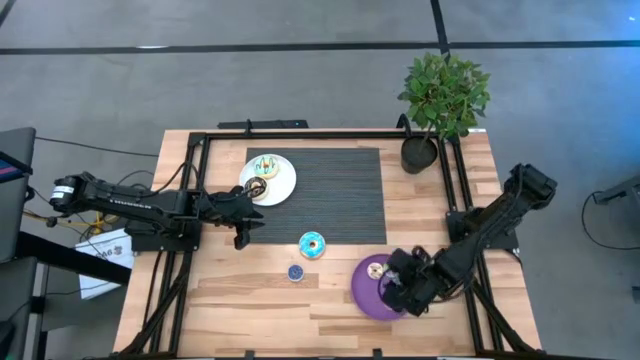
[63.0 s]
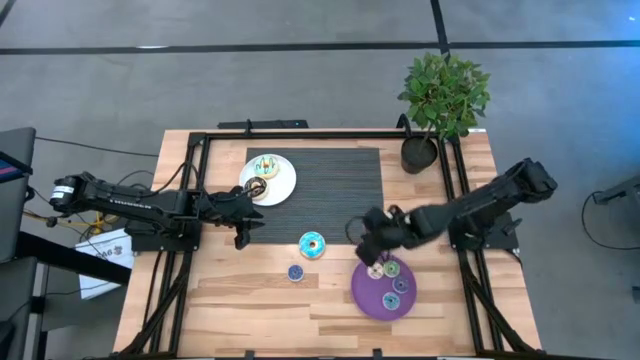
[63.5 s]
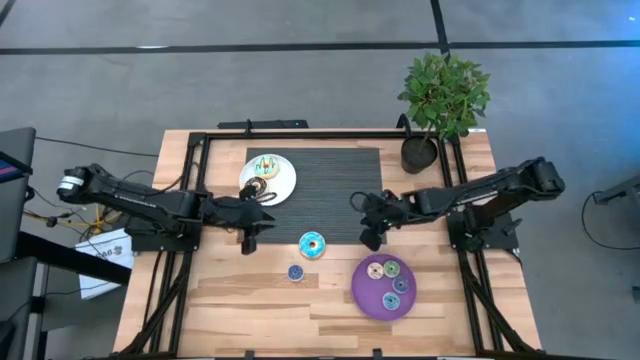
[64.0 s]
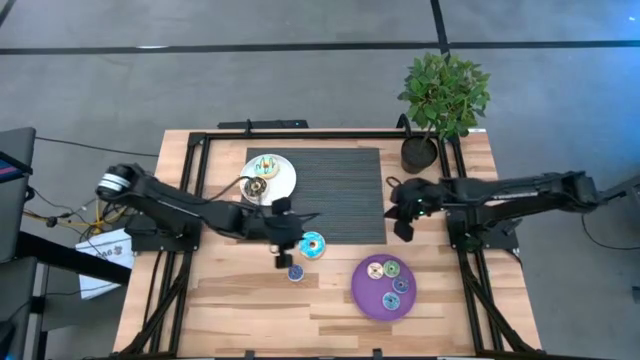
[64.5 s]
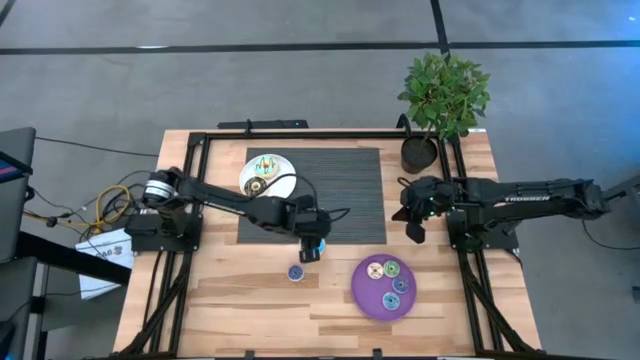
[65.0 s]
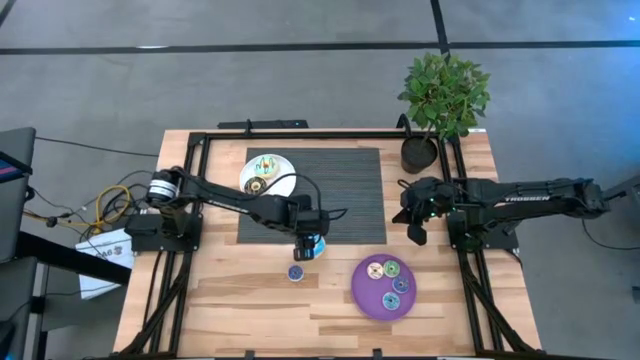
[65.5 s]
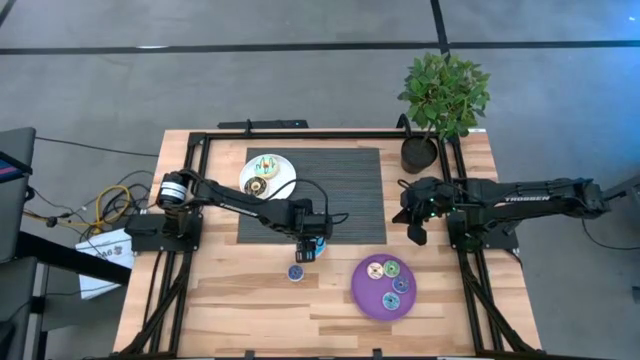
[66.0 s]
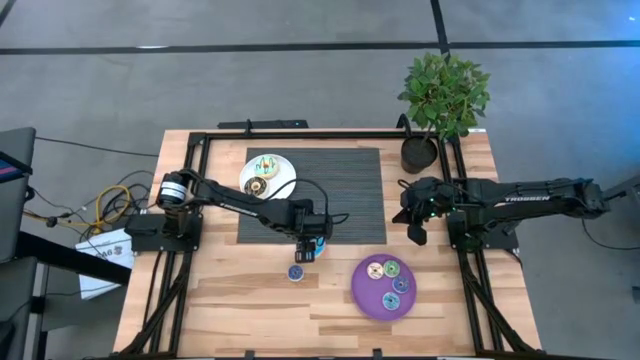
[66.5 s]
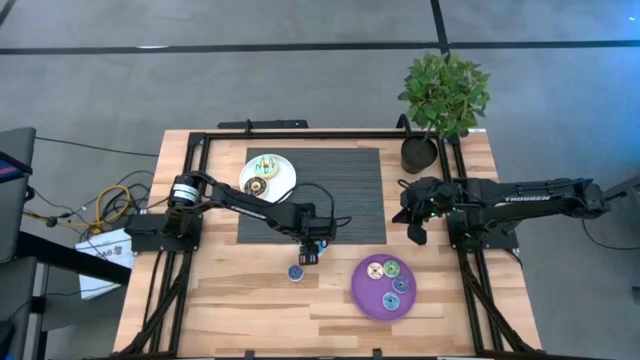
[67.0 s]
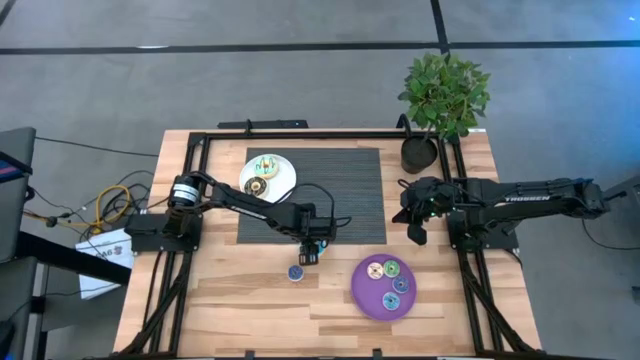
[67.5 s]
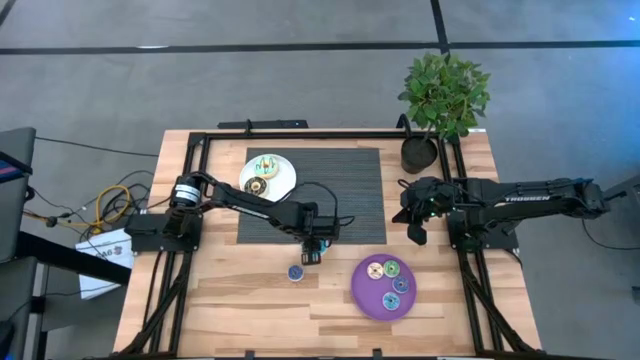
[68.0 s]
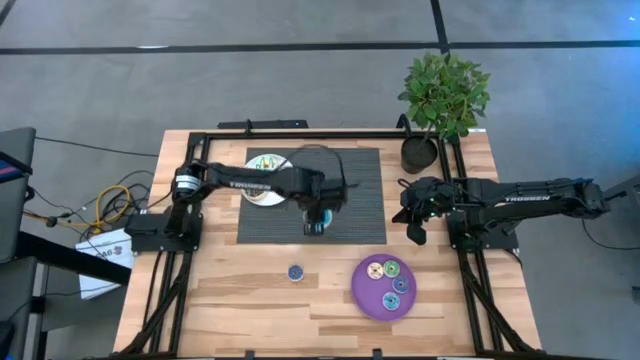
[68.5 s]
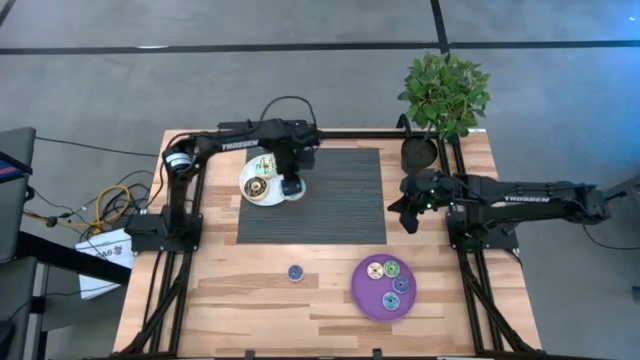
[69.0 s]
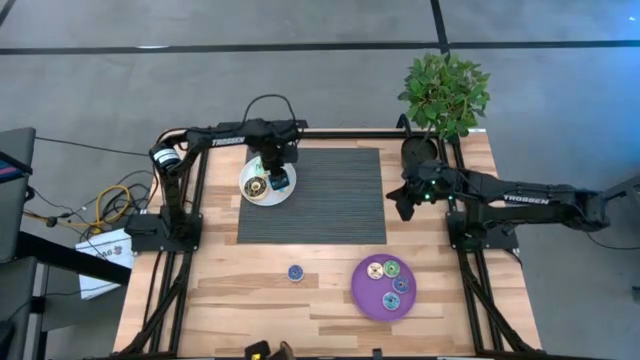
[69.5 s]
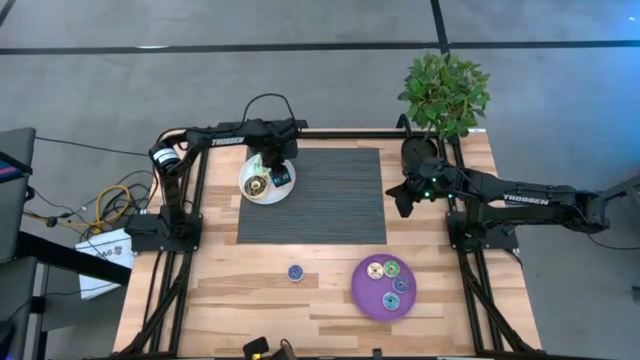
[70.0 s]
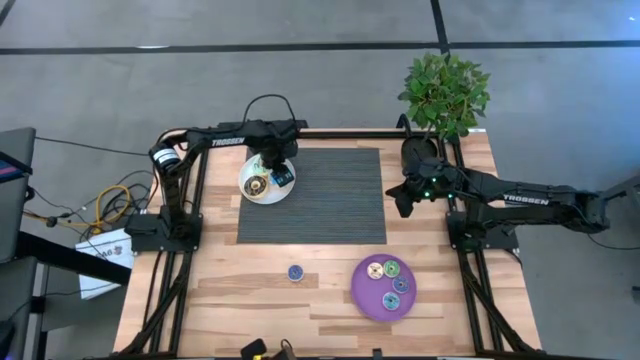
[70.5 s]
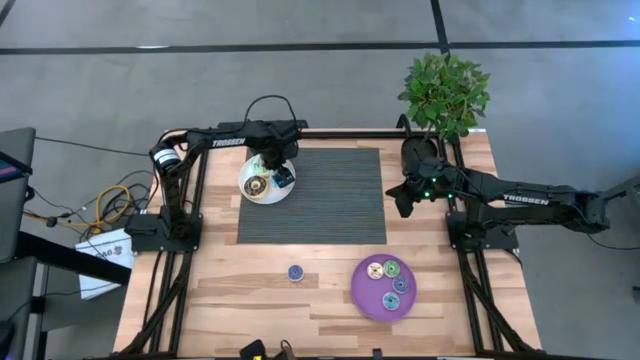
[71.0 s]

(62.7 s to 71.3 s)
Task: Pick & Place donuts
Put the large light blue donut on the white plate

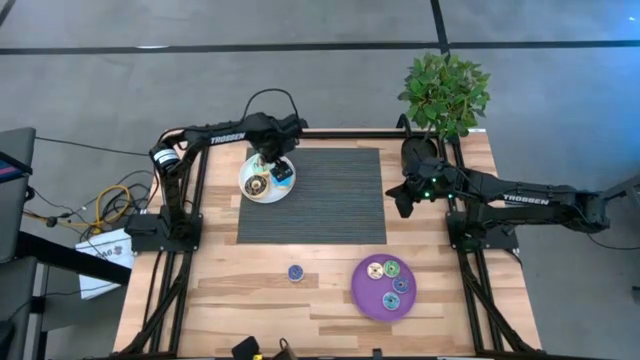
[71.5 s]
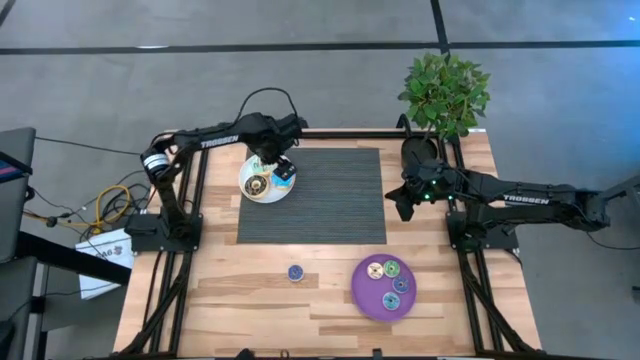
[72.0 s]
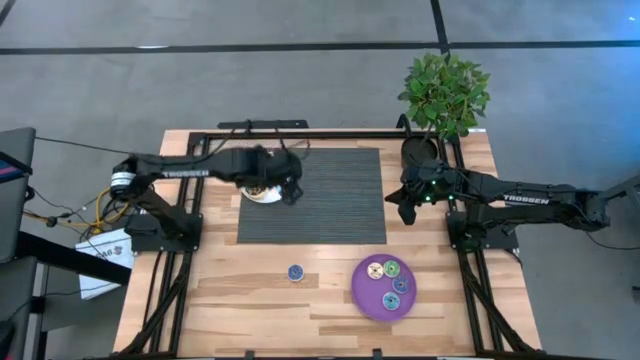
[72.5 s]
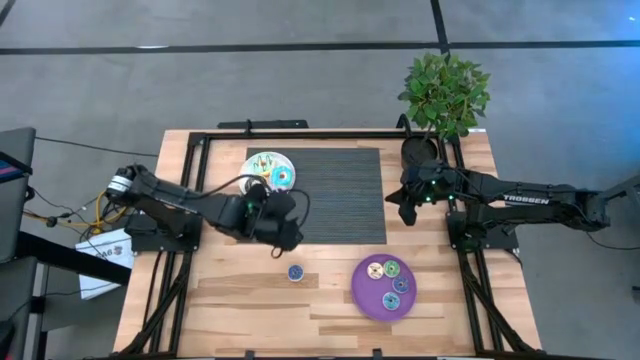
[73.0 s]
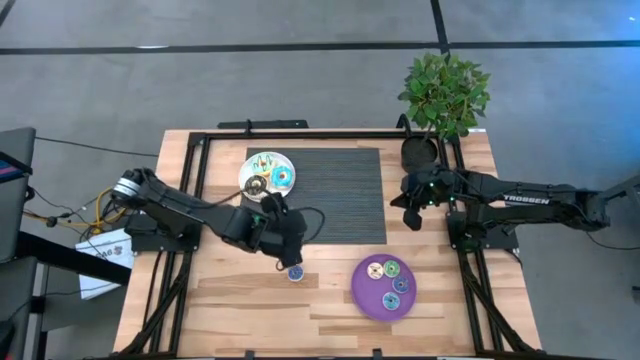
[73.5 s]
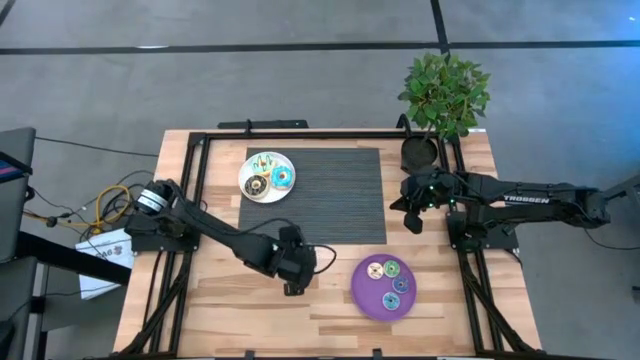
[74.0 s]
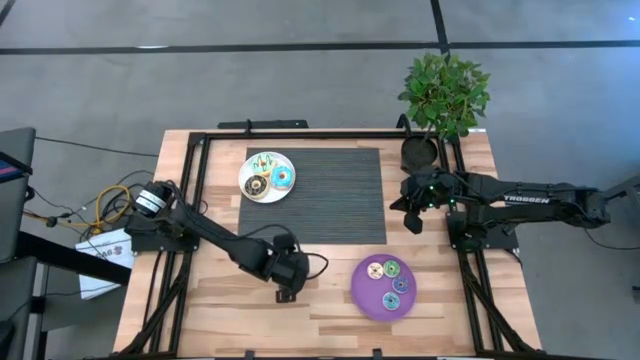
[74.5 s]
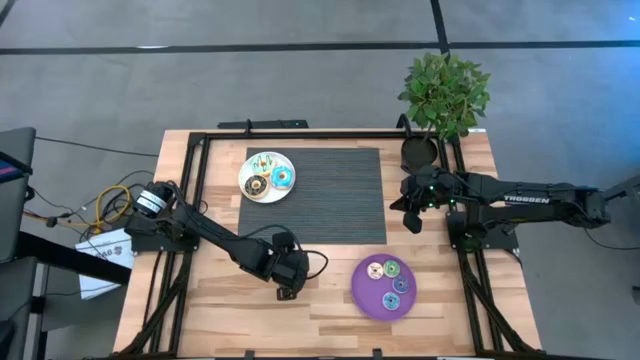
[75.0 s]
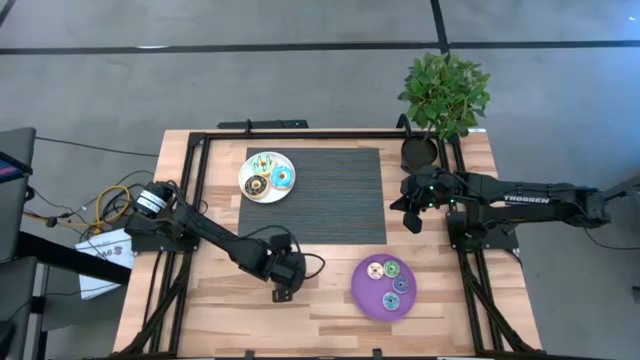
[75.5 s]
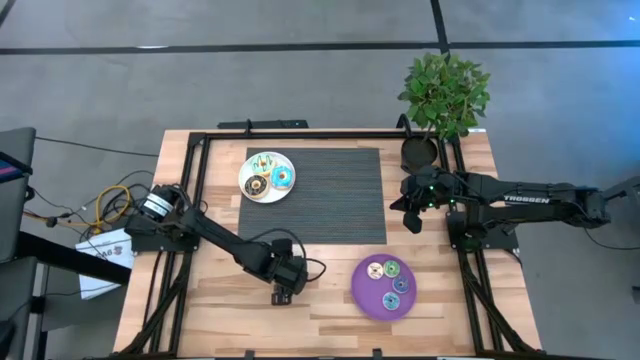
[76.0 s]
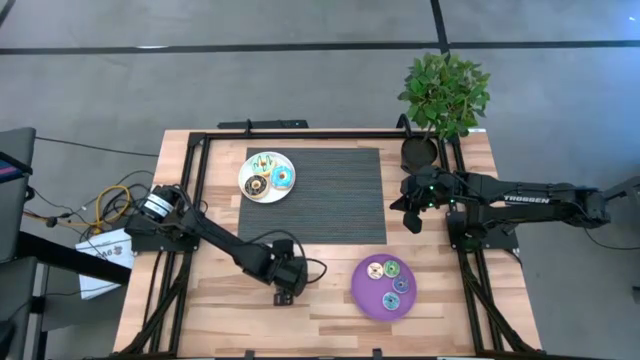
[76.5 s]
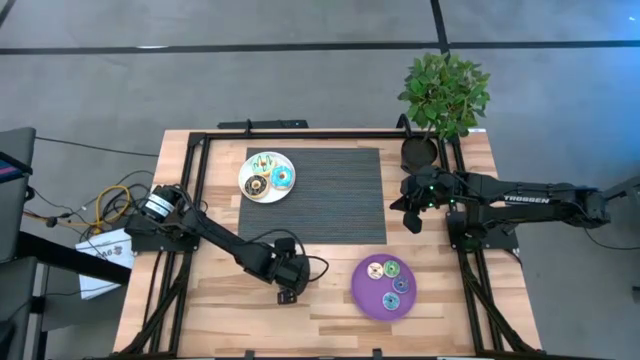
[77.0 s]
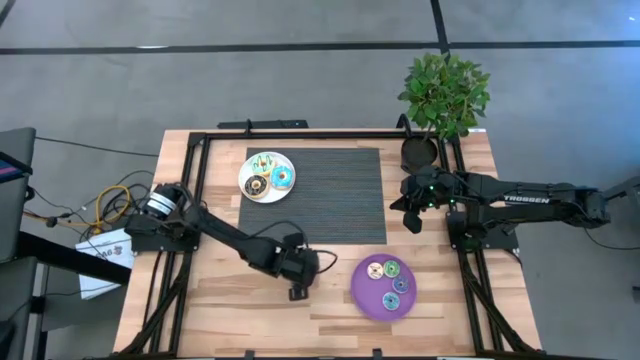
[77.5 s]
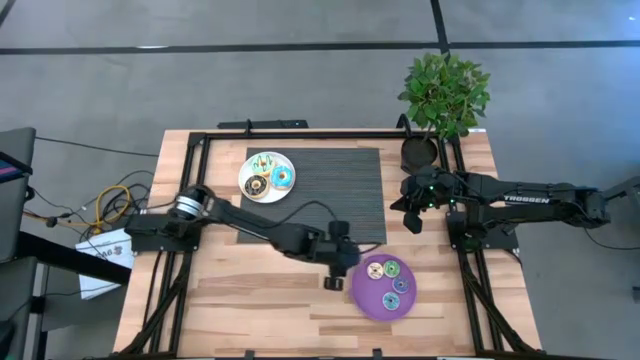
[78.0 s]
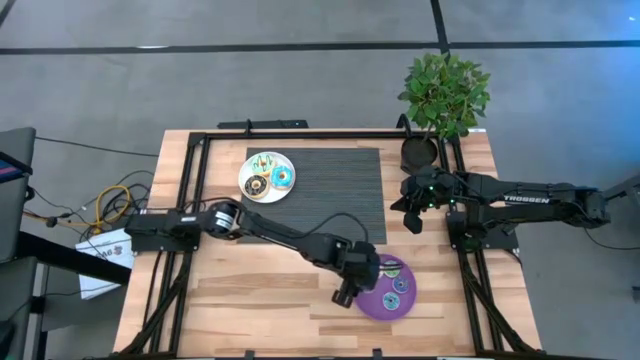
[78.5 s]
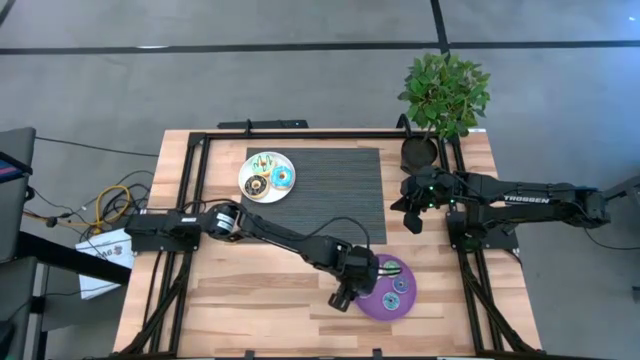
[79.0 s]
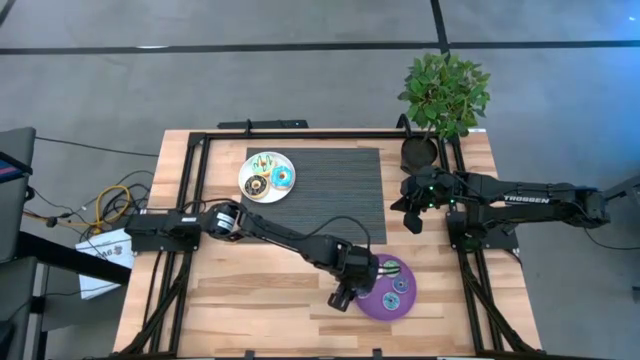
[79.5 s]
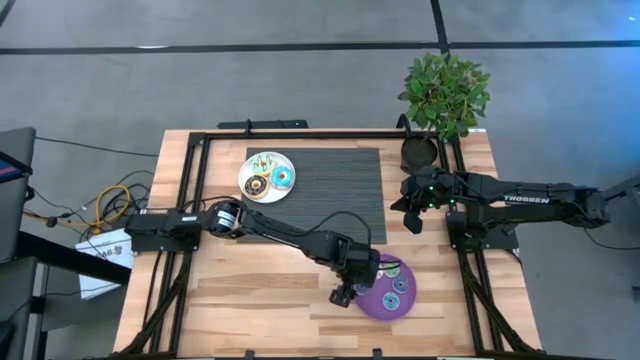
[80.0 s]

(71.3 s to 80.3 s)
Put the small blue donut on the purple plate

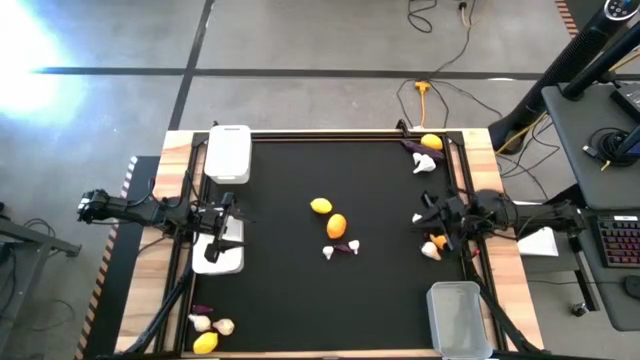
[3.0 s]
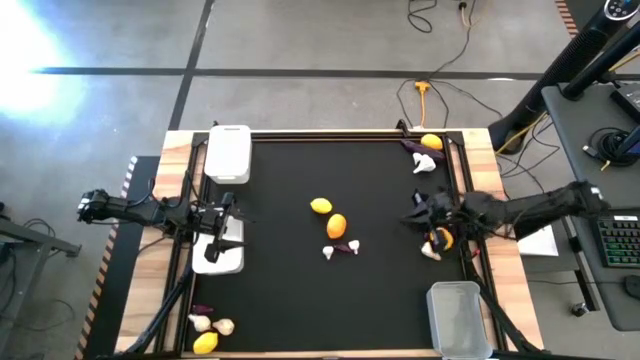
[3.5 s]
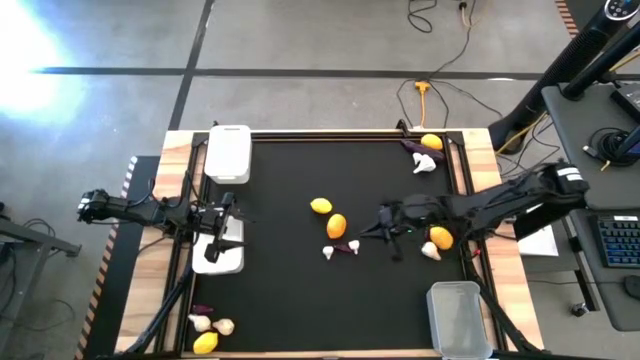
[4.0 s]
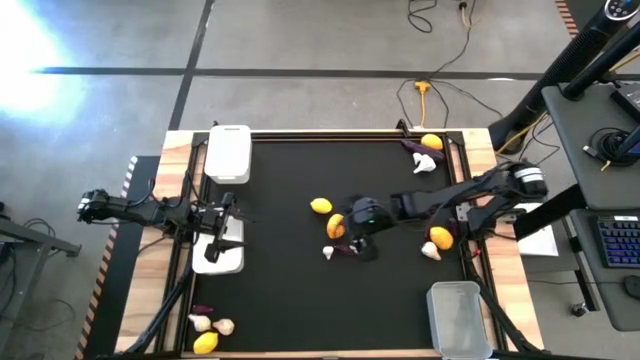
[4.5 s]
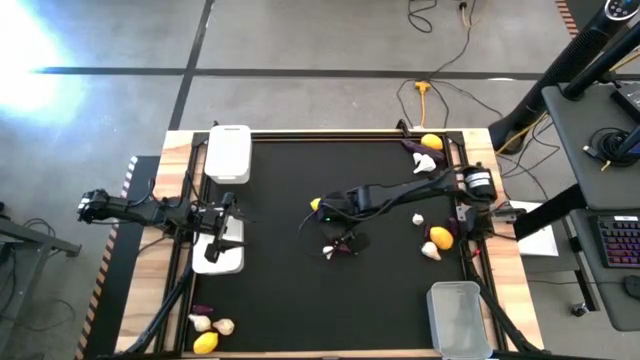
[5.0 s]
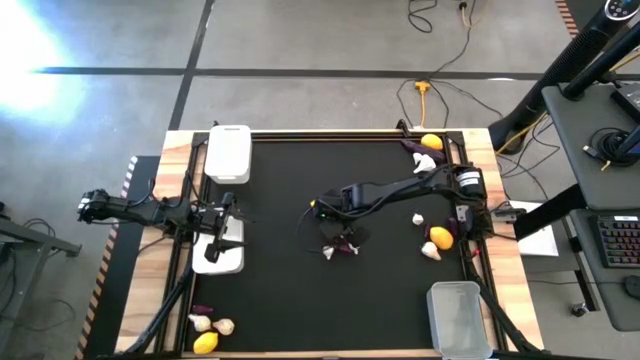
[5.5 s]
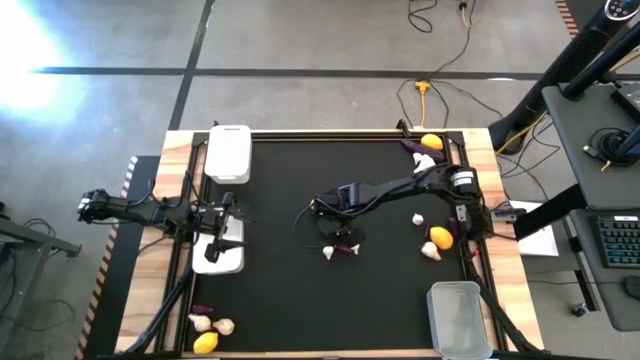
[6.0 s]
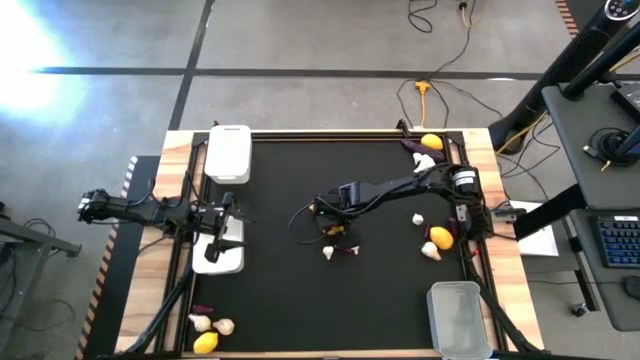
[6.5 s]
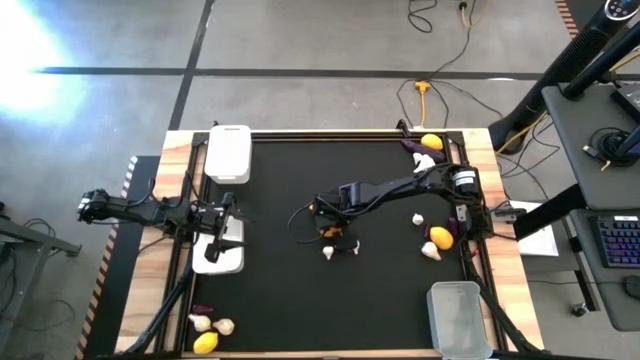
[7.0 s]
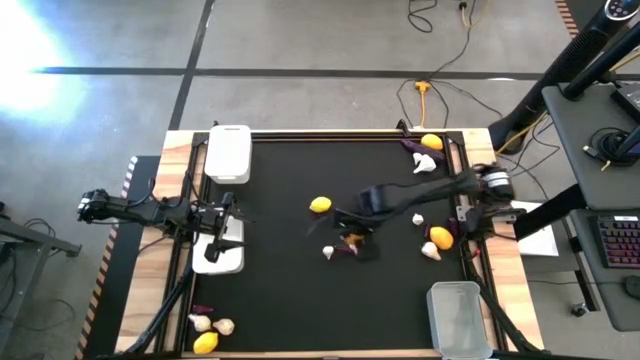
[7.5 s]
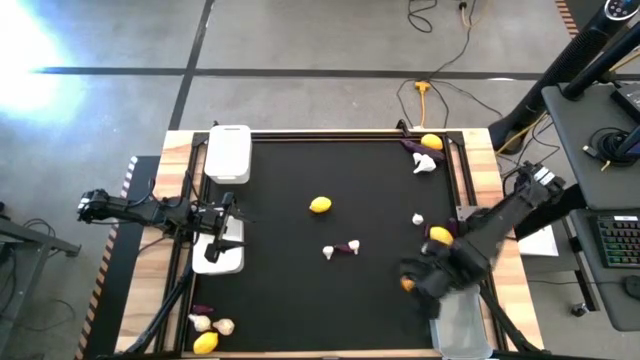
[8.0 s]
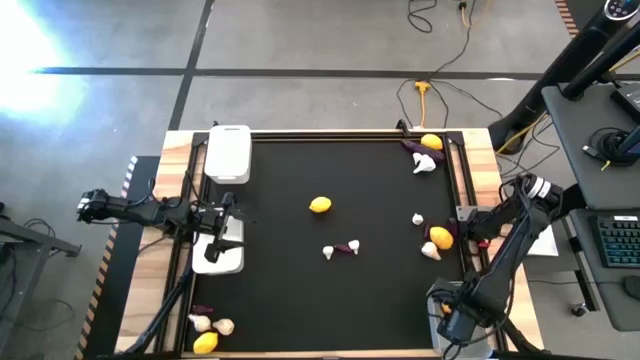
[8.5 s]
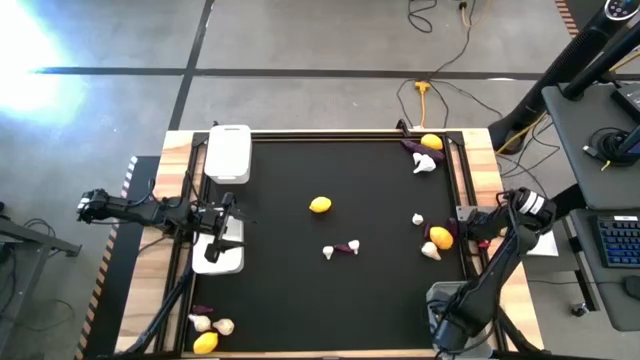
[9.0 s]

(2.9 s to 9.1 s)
Task: Sort produce into baskets
Put the lemon into the gray bin
